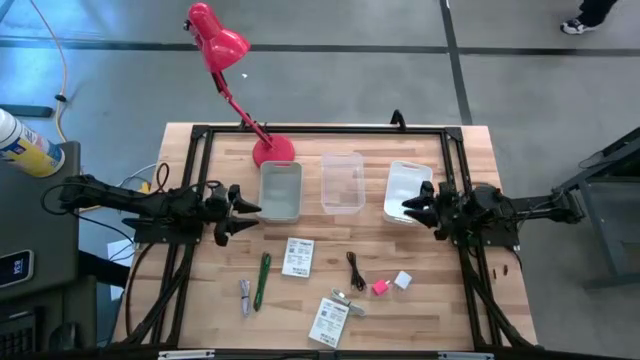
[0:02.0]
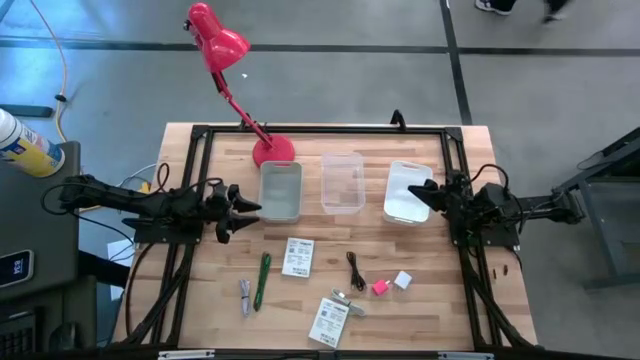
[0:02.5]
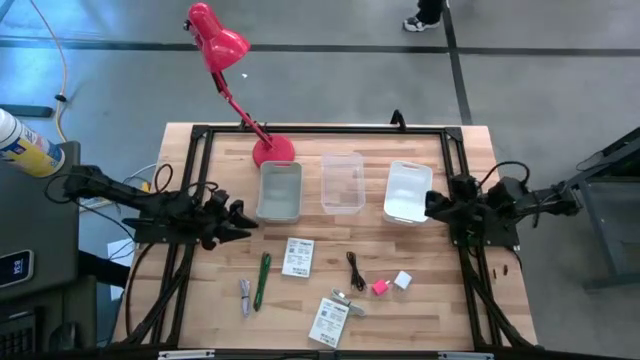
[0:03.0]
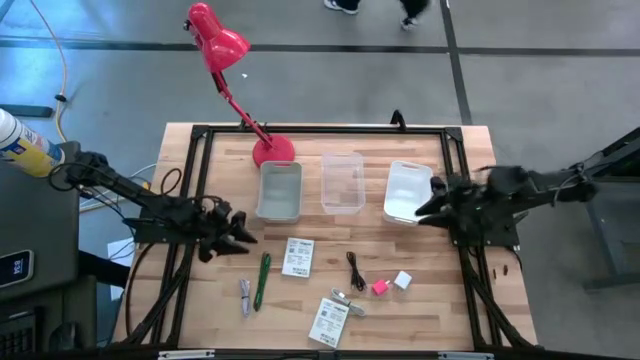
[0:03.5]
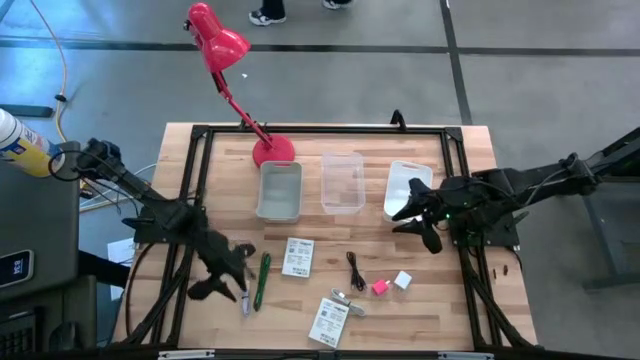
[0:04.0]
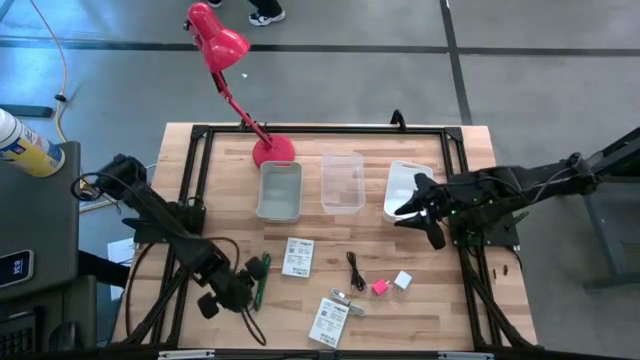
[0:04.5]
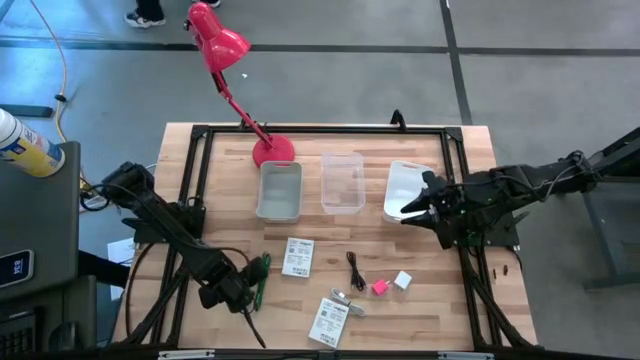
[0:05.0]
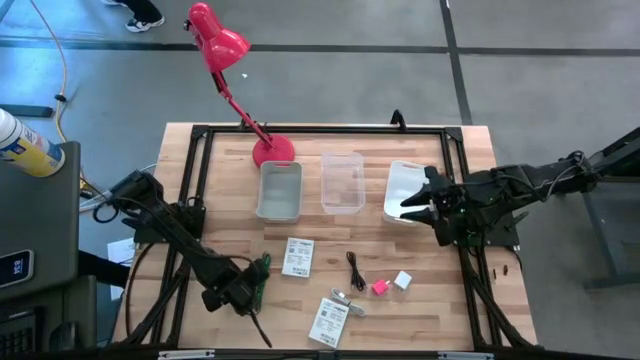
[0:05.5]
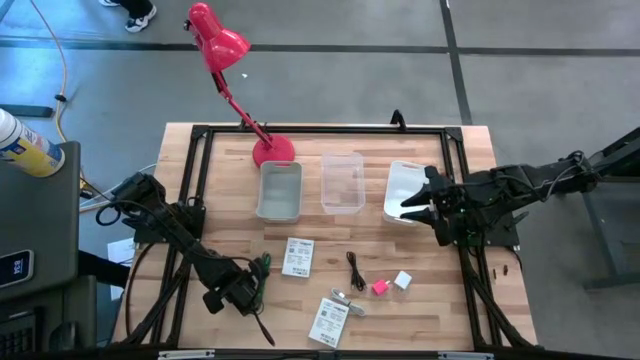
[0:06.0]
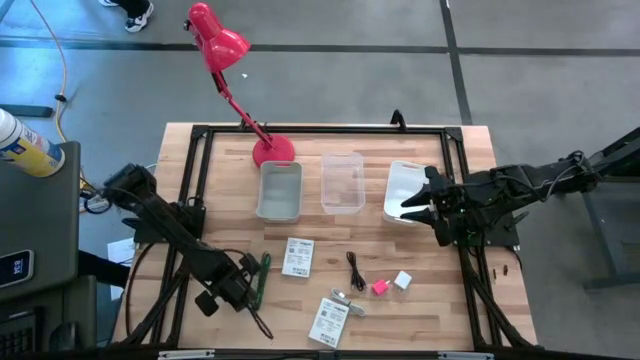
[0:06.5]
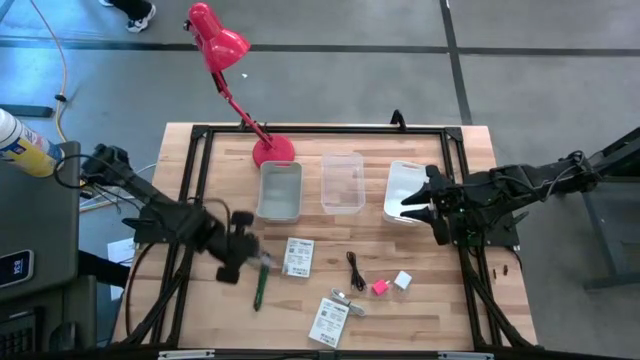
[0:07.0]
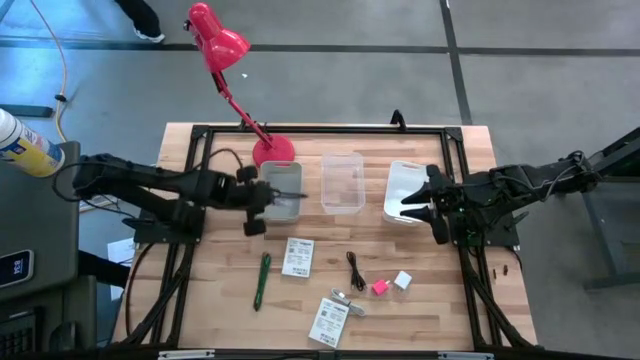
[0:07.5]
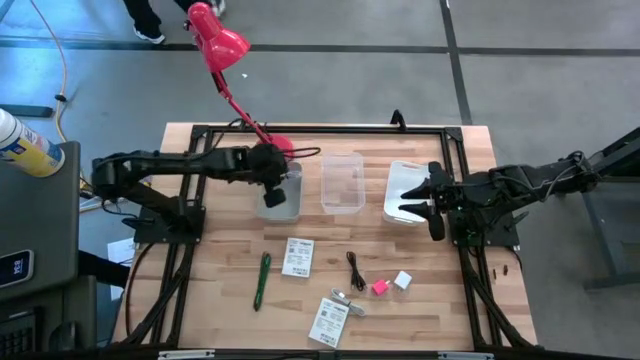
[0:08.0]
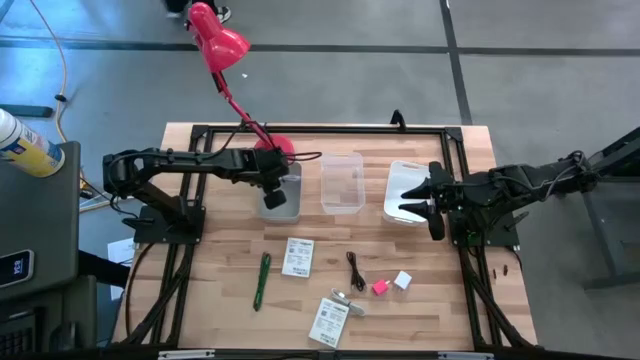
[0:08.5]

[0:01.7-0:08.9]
Task: Pick and place items into bin
Put the left white charger cable into the gray bin

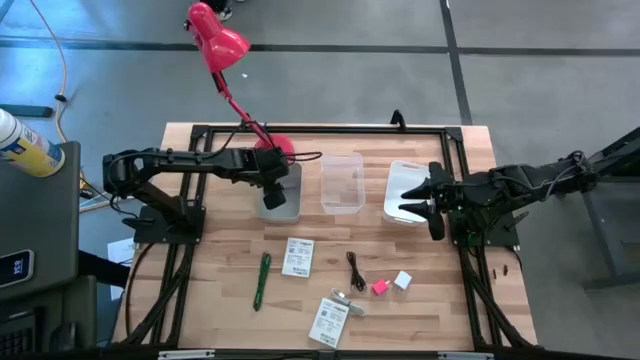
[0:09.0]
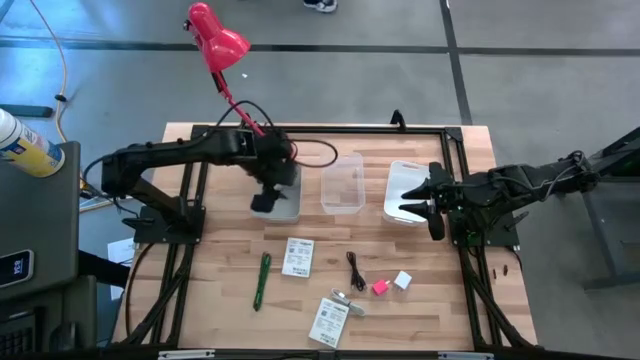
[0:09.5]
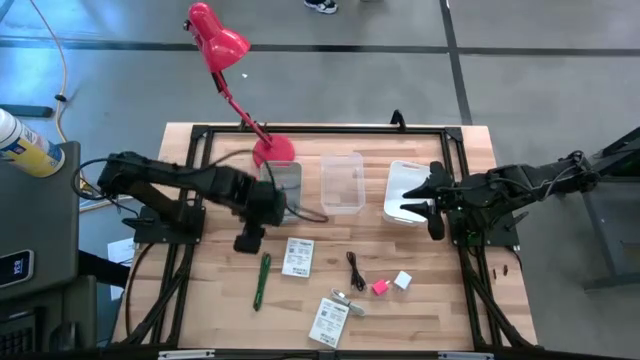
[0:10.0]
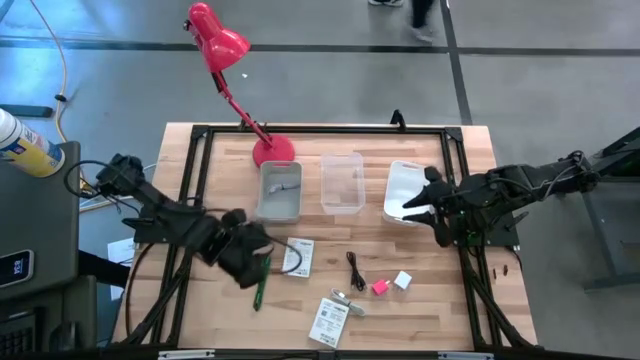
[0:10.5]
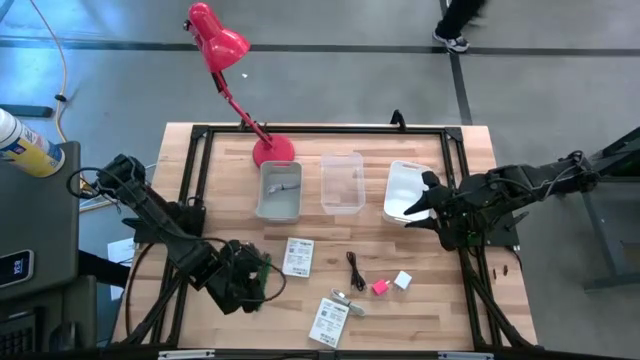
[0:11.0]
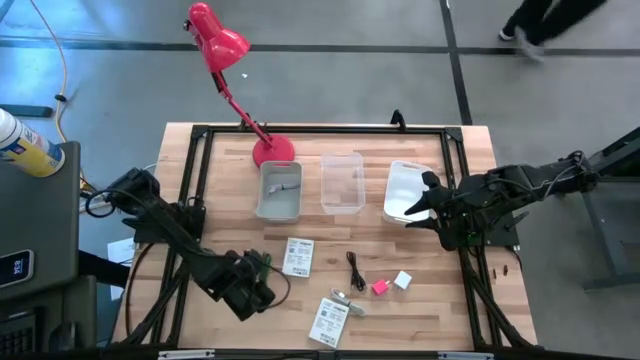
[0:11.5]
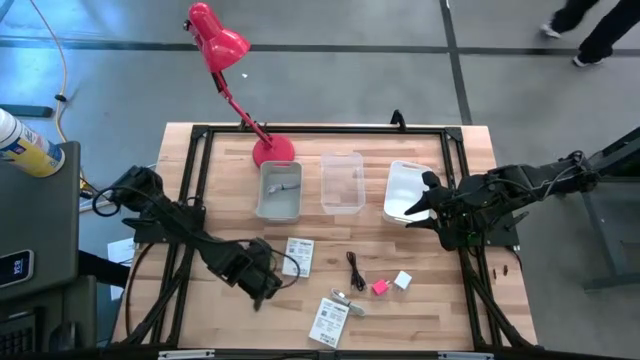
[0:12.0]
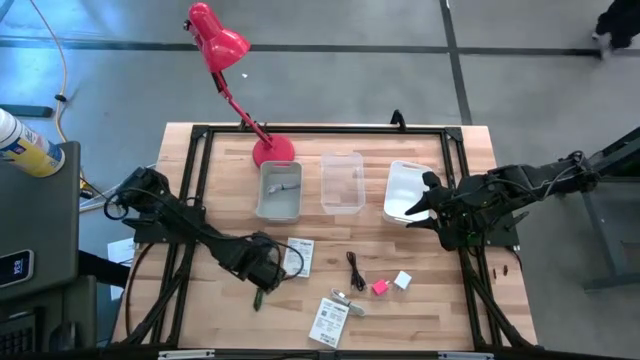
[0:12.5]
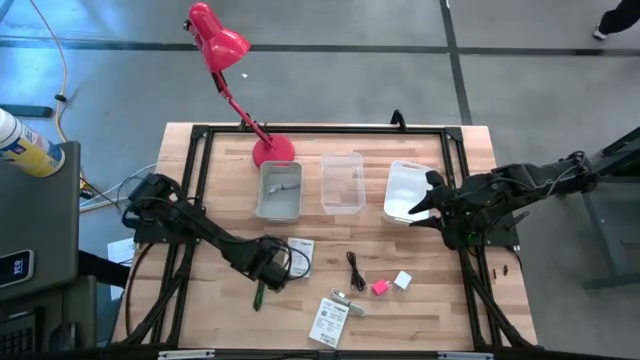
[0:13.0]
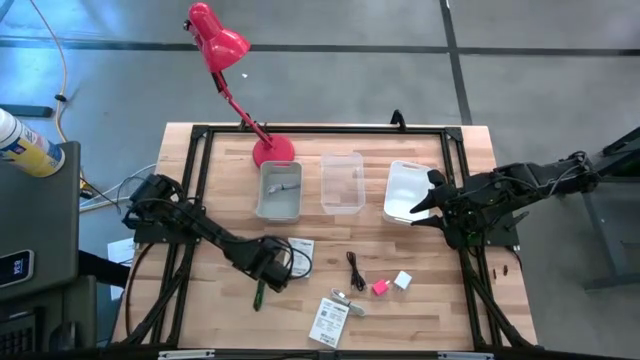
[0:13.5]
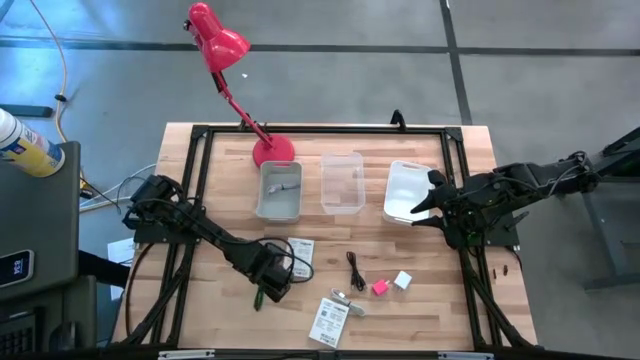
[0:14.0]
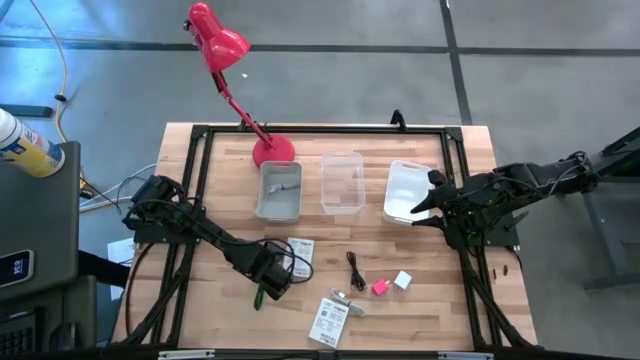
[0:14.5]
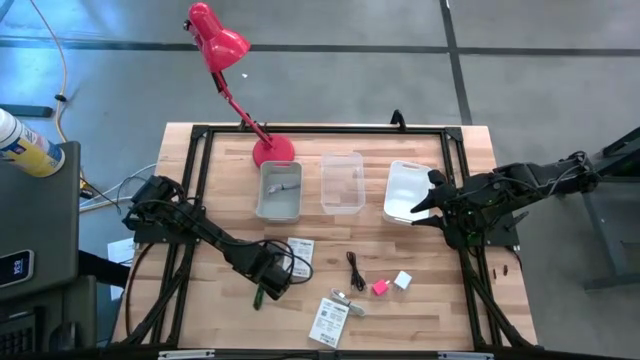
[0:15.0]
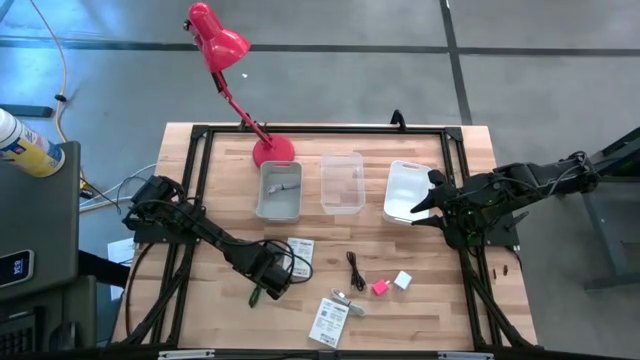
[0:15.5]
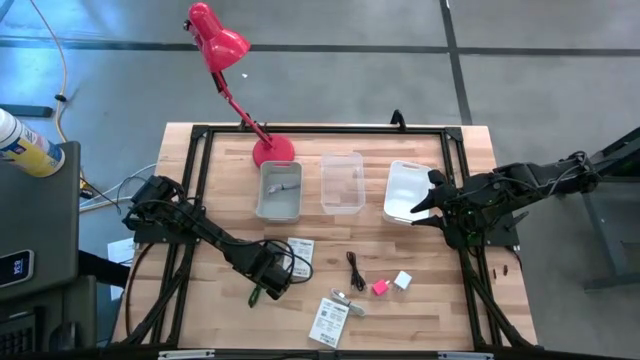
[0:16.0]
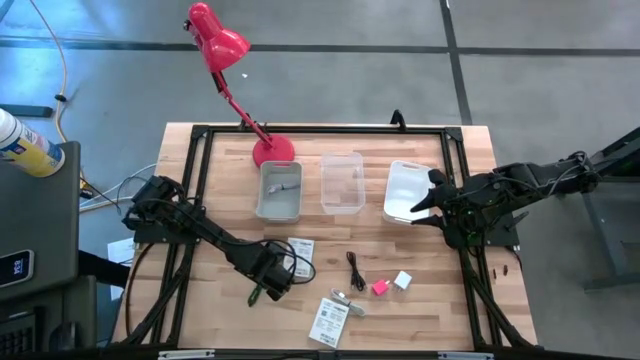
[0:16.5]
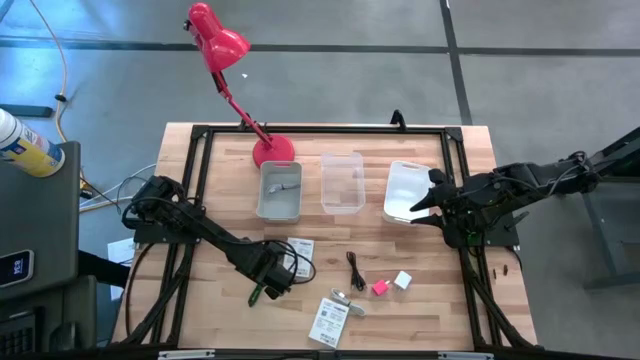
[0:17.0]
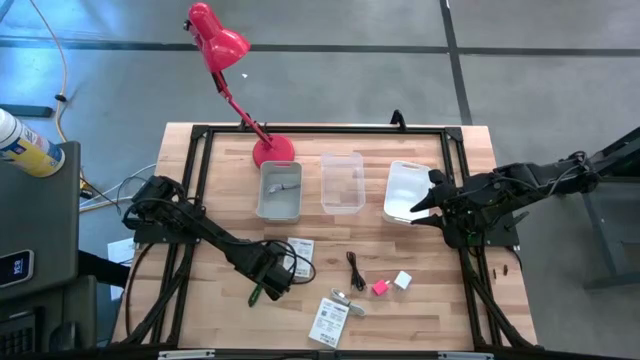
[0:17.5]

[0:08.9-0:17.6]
Put the black and green charger cable into the gray bin

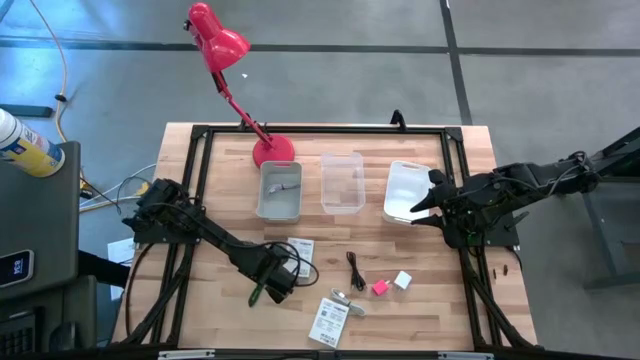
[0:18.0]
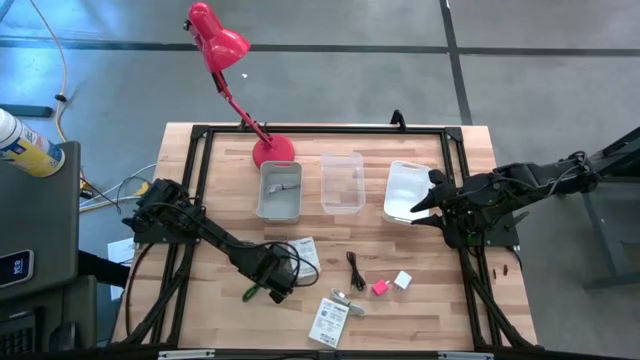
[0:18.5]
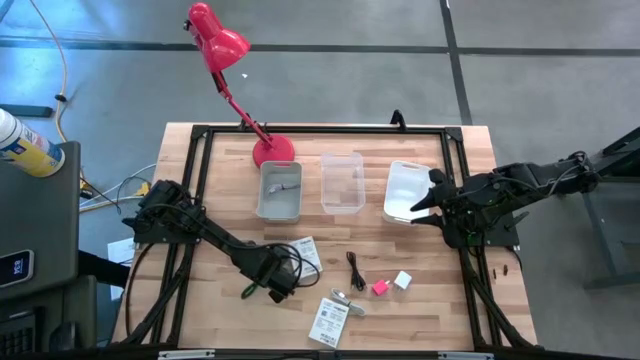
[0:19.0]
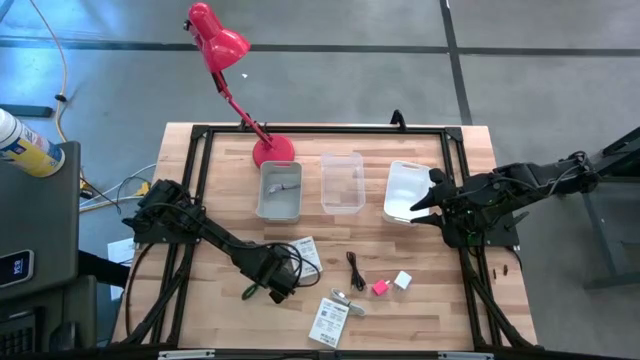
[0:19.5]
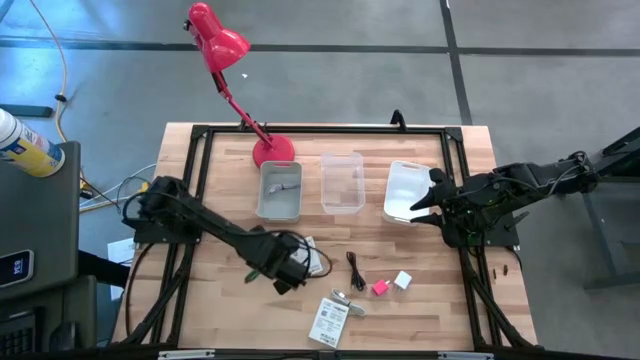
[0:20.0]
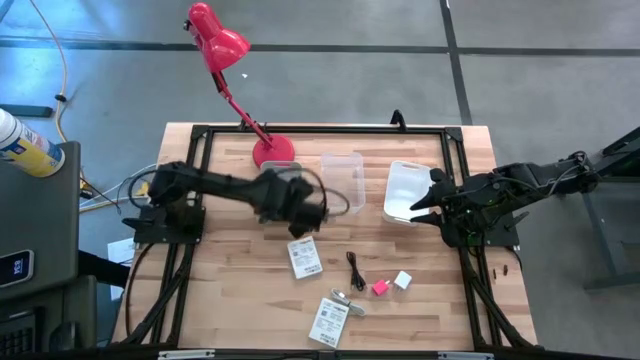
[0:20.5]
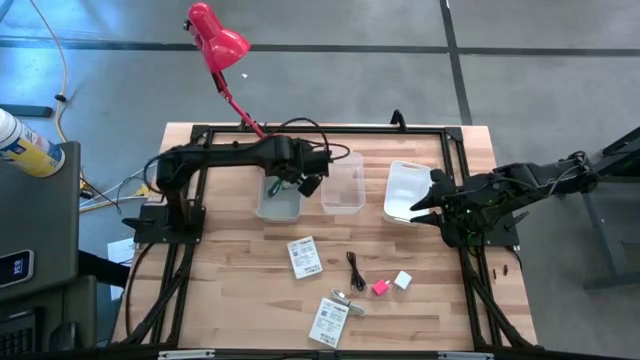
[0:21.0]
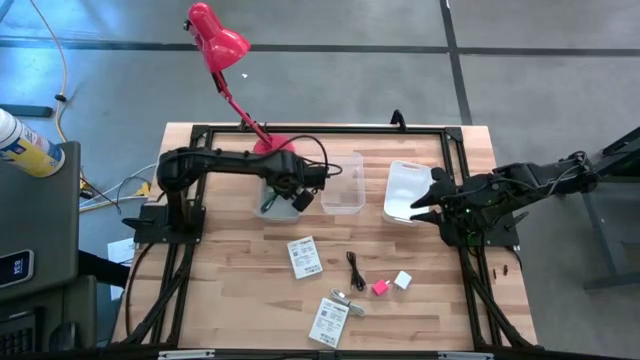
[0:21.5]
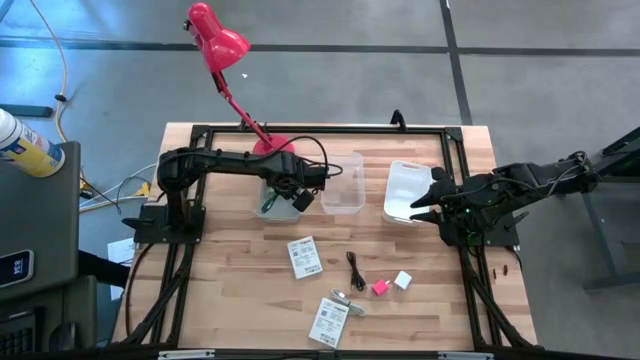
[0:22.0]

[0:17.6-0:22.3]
Put the black and green charger cable into the gray bin

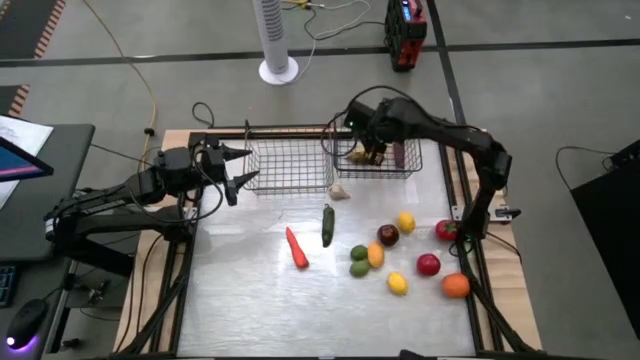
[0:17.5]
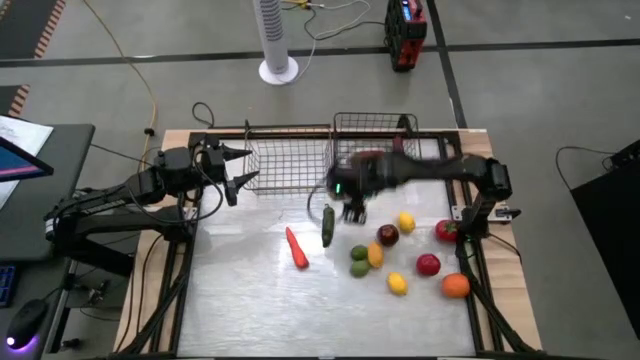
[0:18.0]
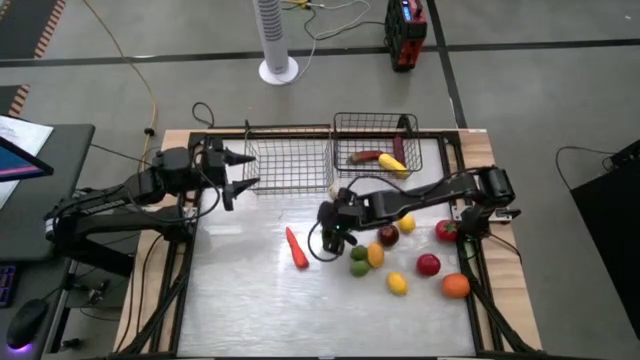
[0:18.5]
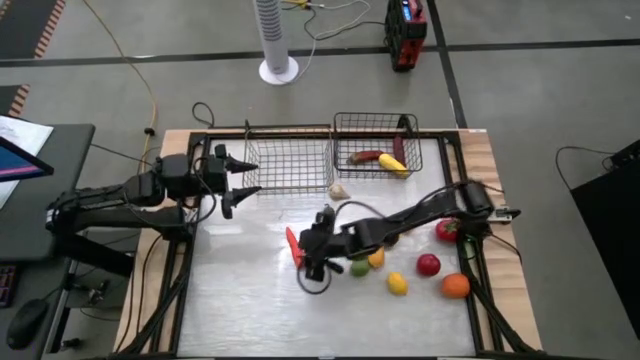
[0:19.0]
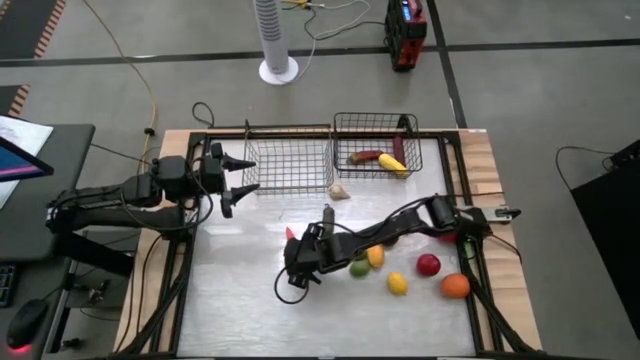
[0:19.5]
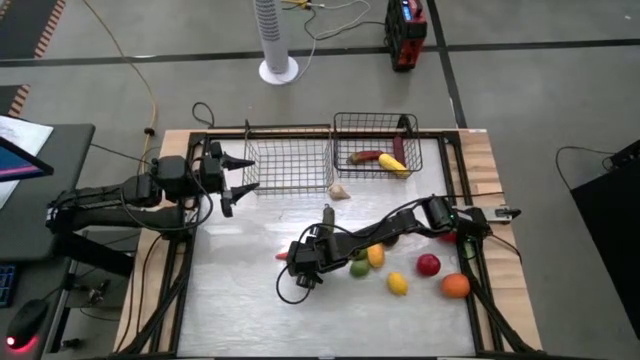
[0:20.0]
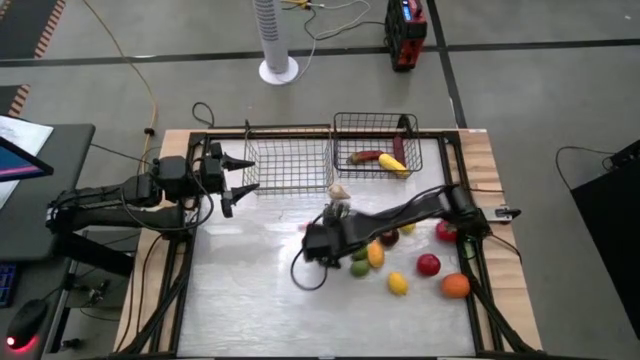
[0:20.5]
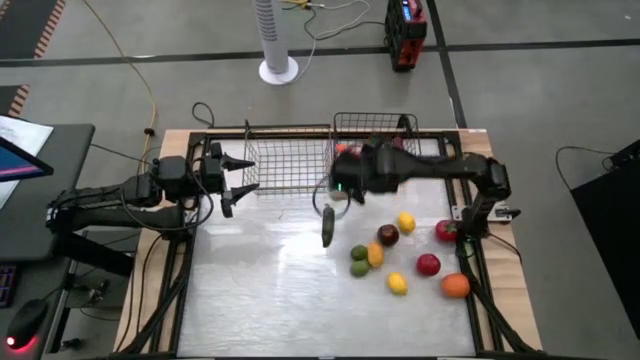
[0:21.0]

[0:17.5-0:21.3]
Task: Sort produce into baskets
Put the carrot into the right wire basket
